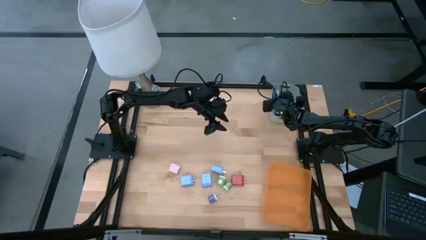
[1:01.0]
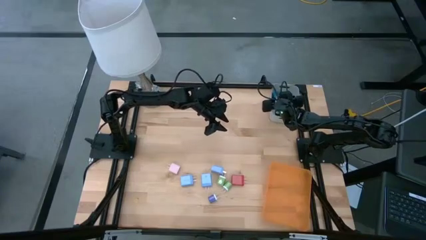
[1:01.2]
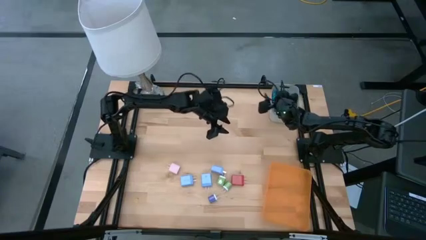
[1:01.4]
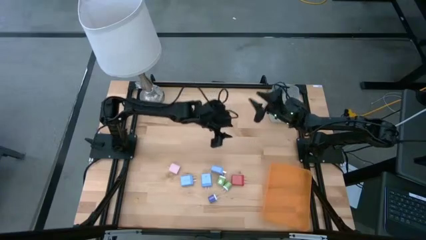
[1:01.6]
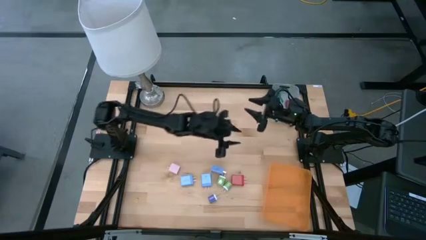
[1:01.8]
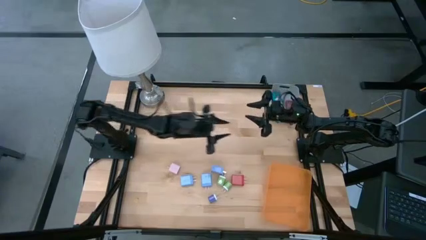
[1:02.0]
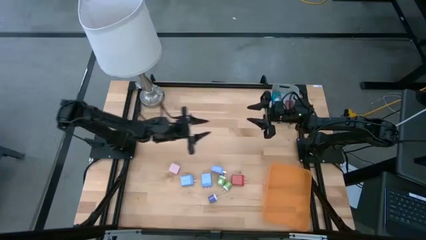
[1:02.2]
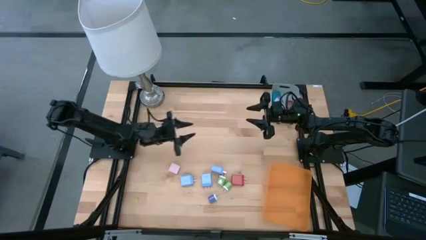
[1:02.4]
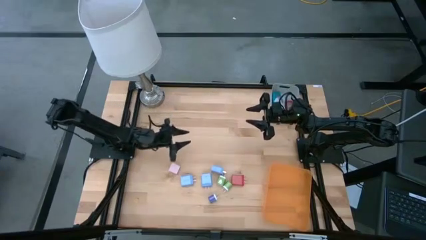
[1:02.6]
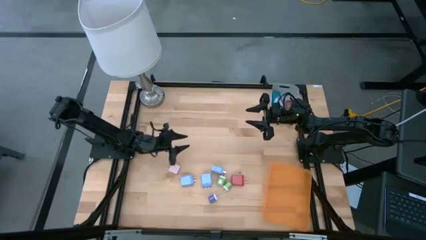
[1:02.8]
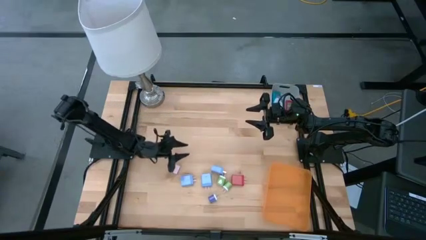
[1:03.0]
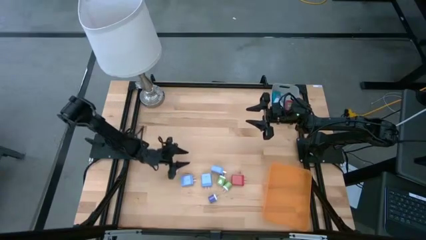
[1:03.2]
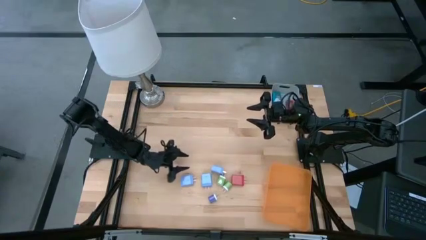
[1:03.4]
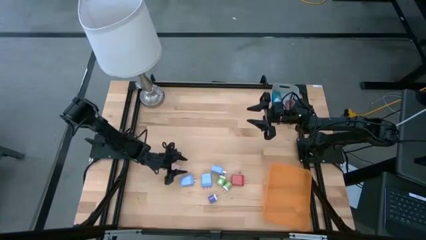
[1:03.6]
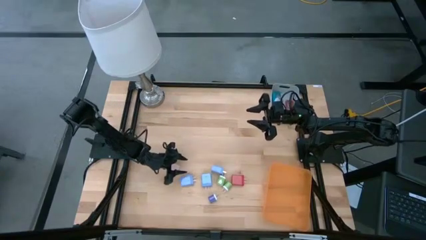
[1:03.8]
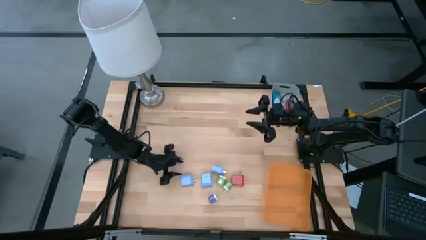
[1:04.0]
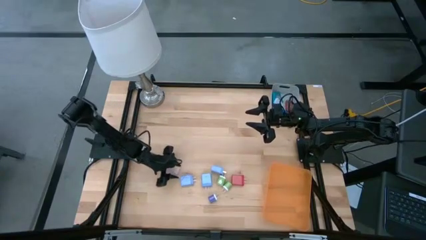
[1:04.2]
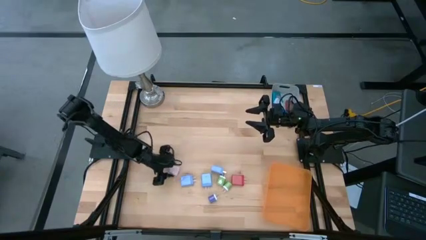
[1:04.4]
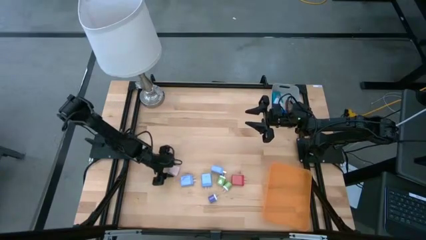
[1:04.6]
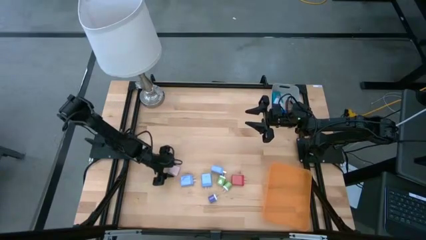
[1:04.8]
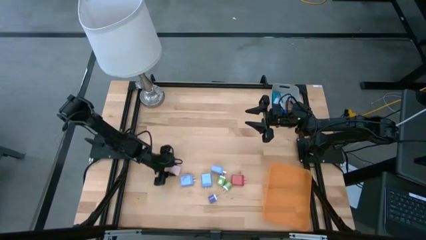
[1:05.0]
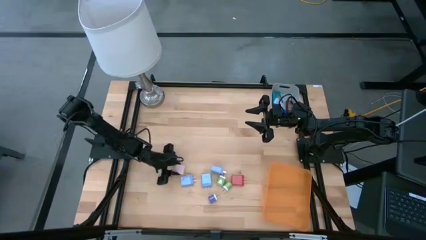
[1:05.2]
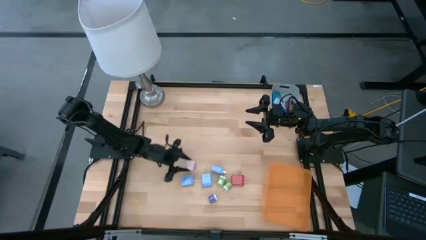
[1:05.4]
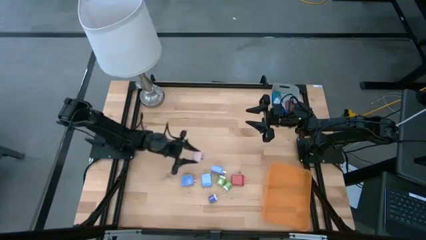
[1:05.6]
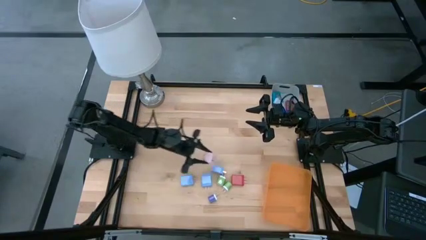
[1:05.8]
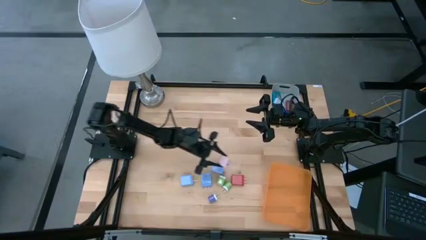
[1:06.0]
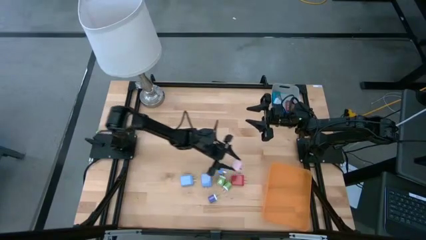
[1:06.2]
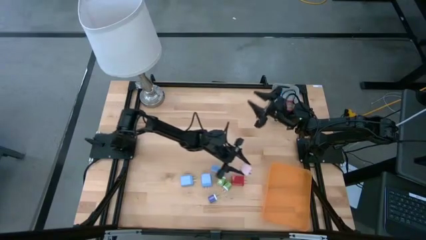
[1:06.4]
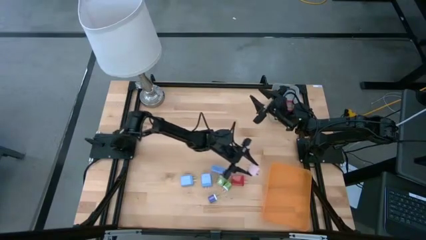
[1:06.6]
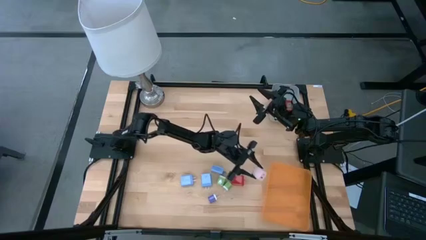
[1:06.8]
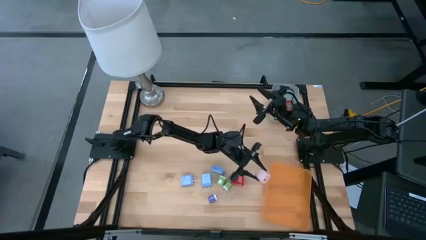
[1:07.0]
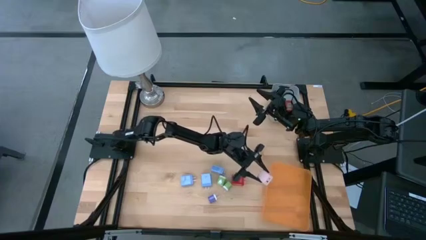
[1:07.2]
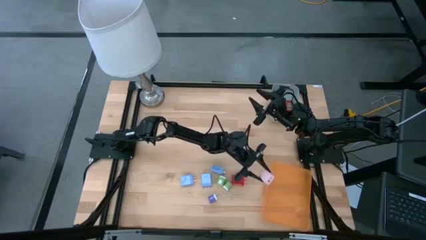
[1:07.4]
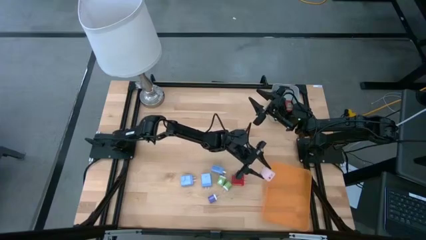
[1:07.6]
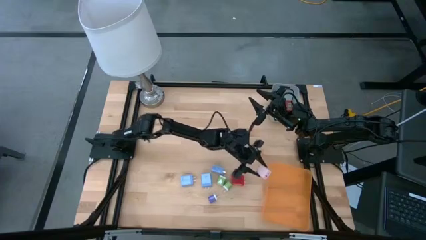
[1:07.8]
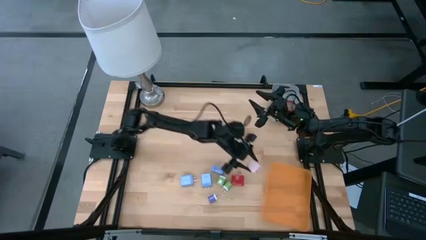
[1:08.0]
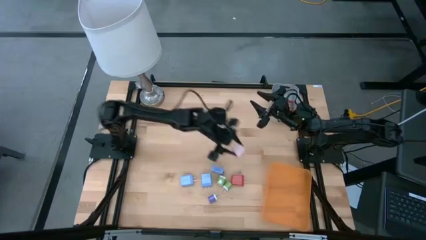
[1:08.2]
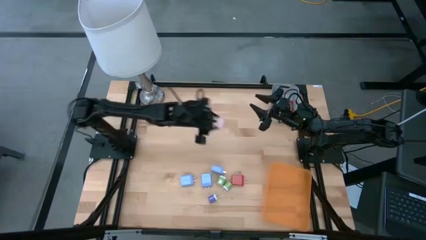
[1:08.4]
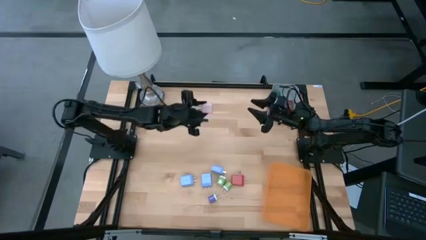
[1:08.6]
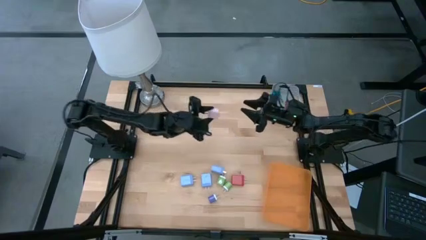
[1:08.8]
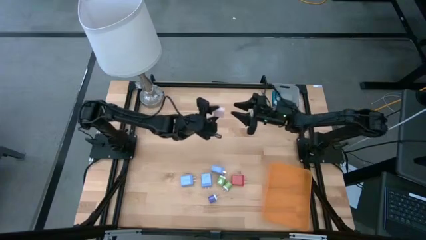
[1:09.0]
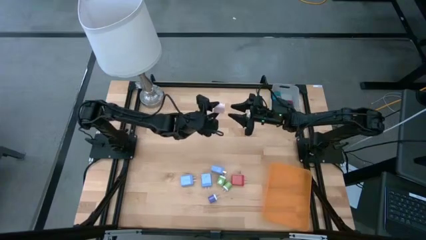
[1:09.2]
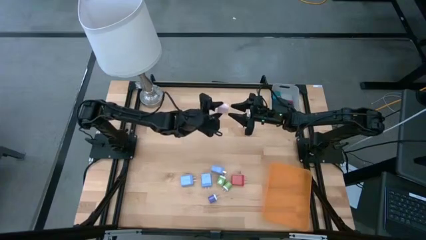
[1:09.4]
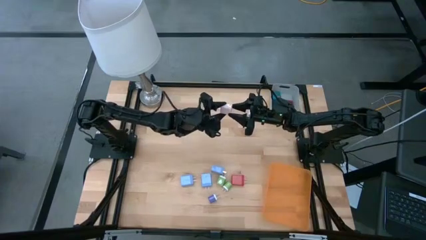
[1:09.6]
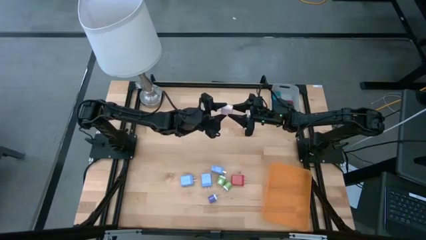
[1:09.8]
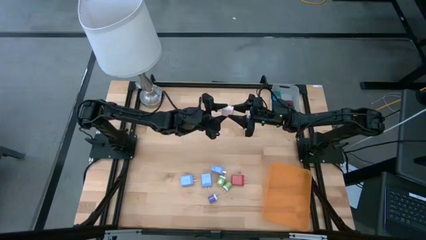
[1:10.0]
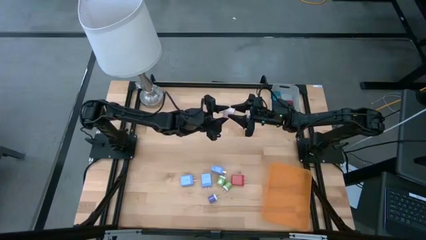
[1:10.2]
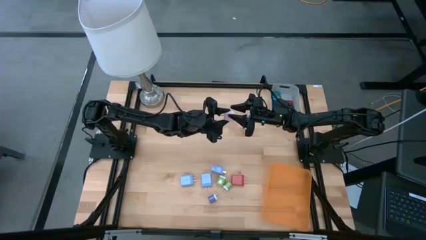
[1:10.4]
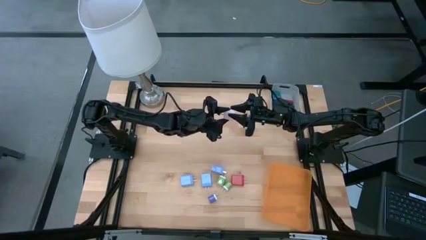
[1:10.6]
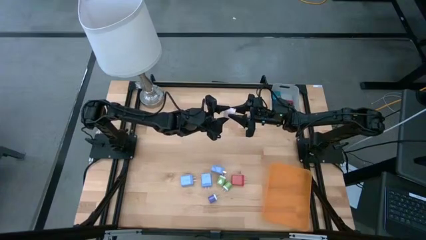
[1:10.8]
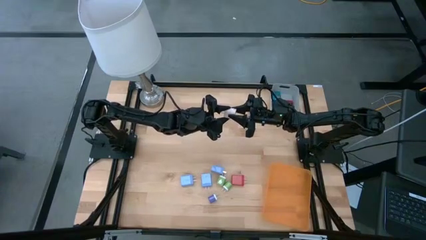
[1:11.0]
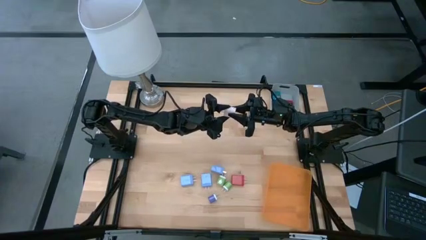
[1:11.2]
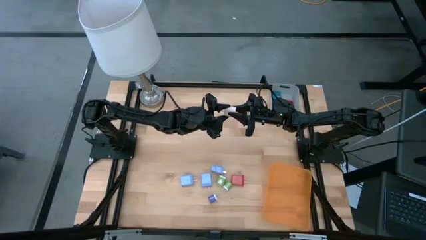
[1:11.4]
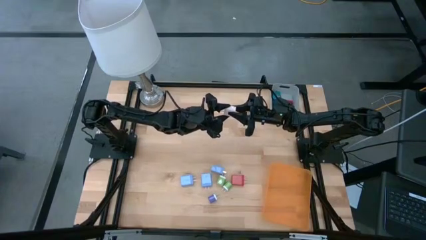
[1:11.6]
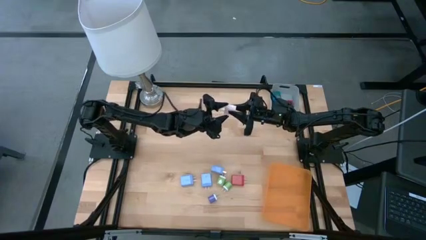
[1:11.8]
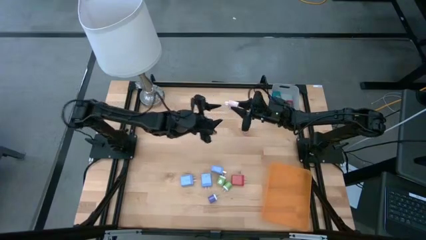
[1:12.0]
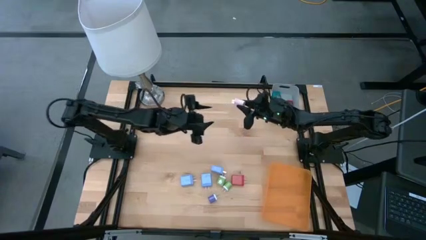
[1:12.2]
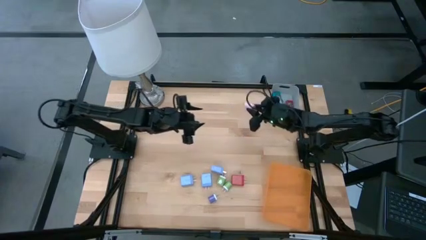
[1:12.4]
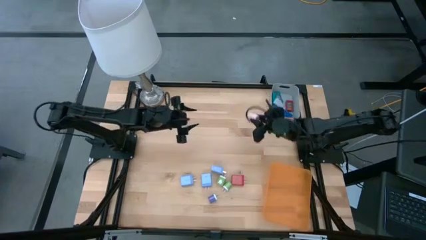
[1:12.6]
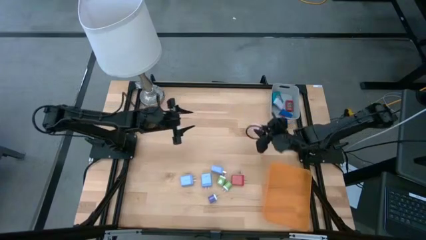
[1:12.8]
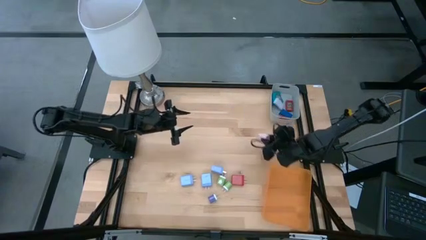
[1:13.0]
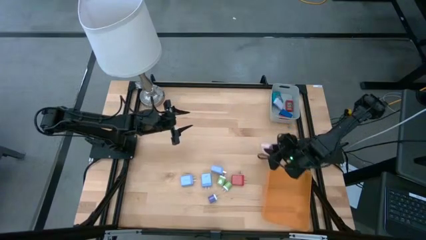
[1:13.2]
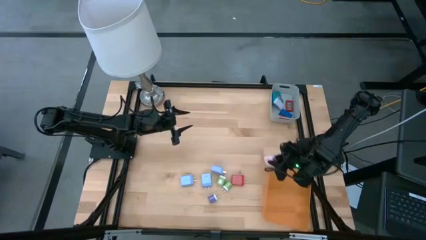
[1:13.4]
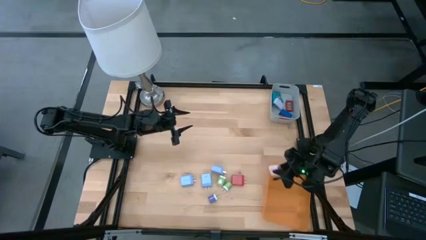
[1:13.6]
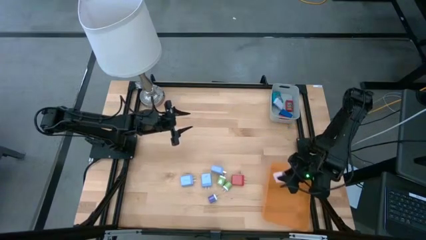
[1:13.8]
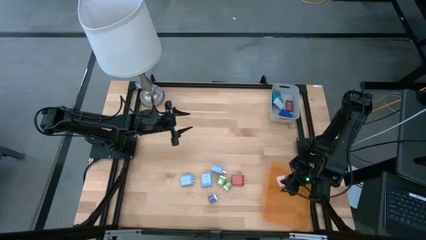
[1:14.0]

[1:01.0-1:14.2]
Task: Pick & Place Office items
Put the light pink charger adapter into the orange bin

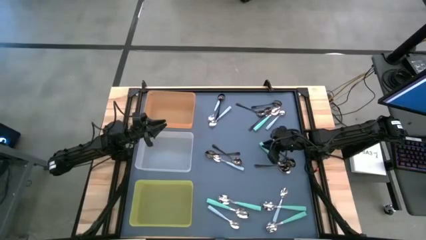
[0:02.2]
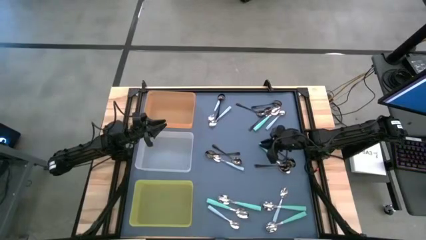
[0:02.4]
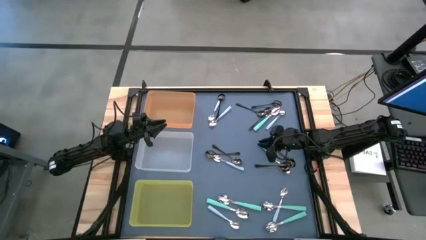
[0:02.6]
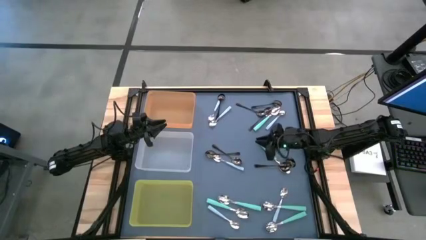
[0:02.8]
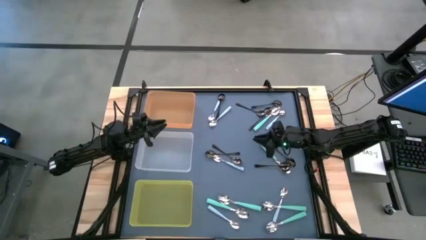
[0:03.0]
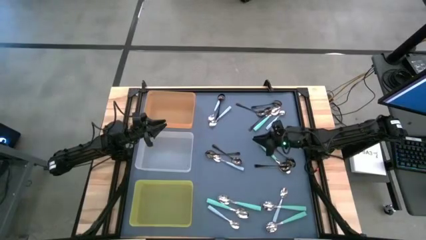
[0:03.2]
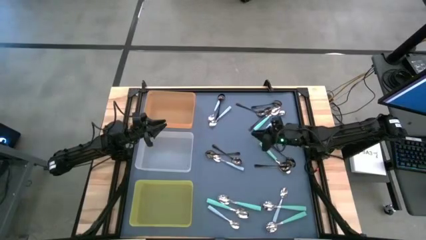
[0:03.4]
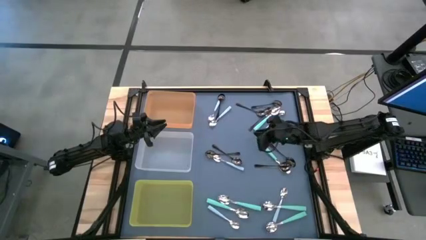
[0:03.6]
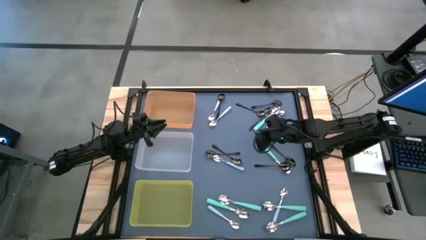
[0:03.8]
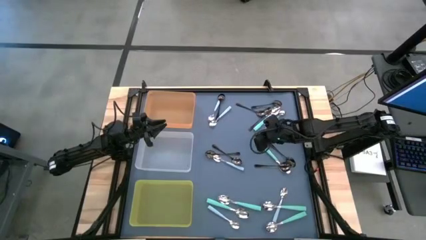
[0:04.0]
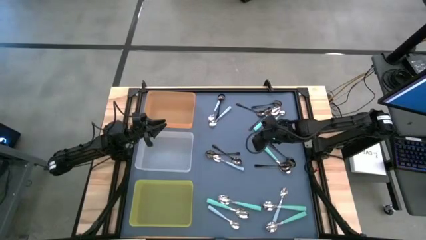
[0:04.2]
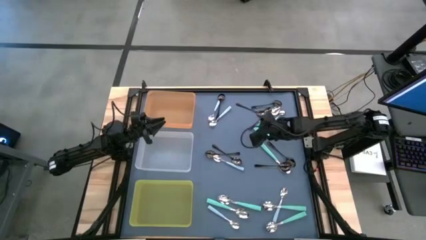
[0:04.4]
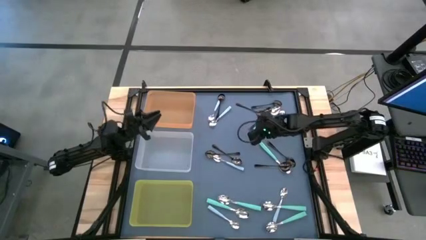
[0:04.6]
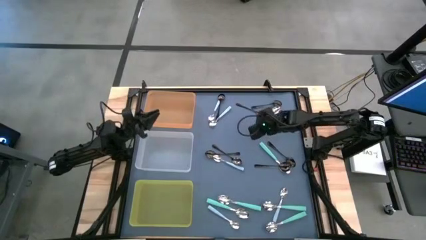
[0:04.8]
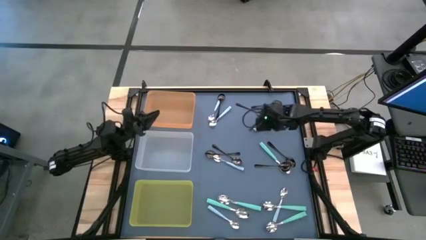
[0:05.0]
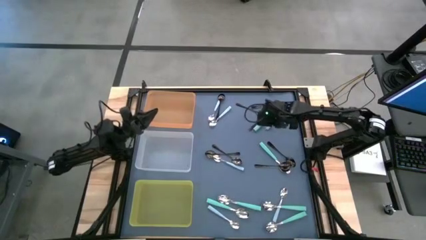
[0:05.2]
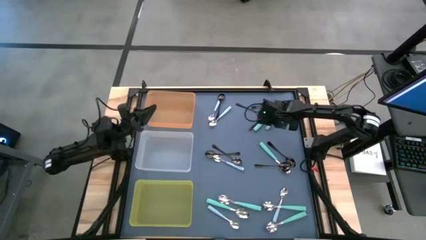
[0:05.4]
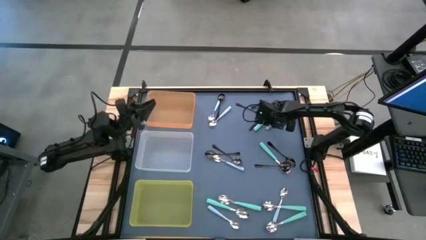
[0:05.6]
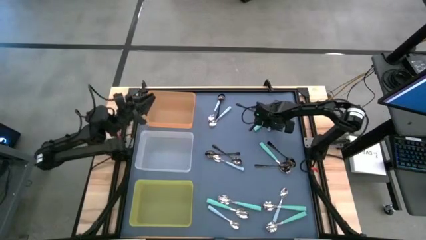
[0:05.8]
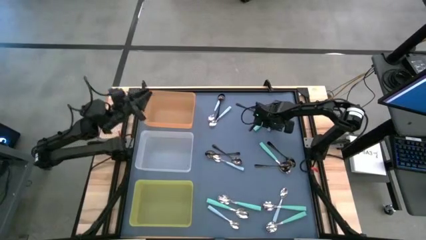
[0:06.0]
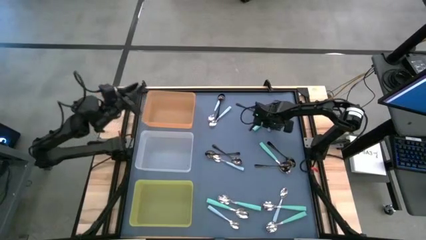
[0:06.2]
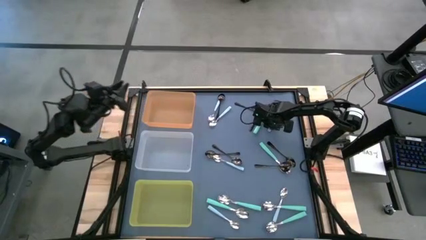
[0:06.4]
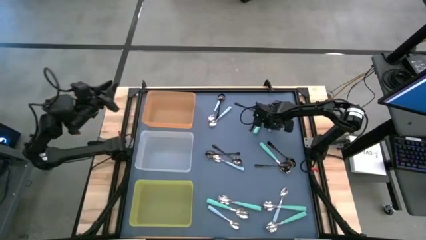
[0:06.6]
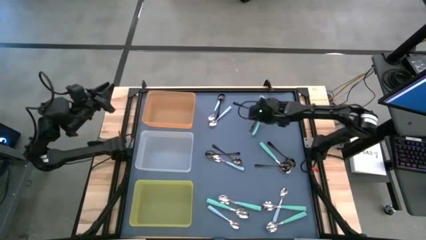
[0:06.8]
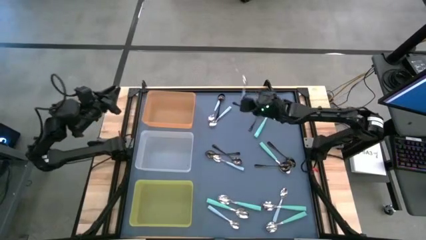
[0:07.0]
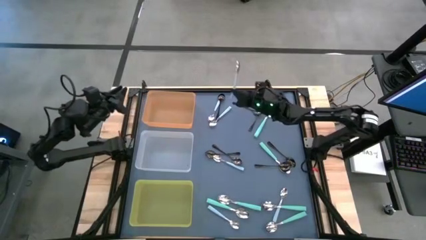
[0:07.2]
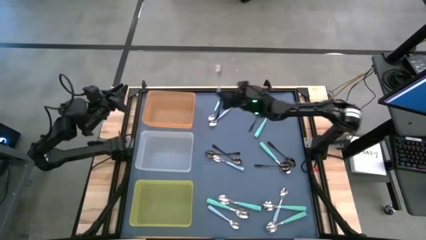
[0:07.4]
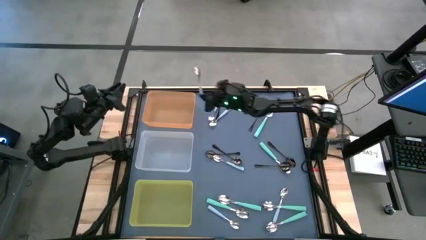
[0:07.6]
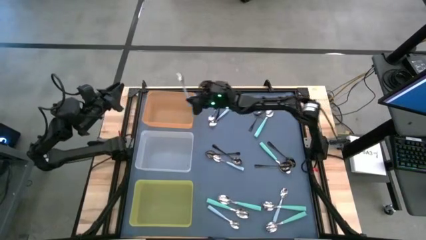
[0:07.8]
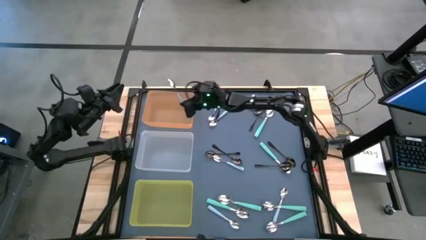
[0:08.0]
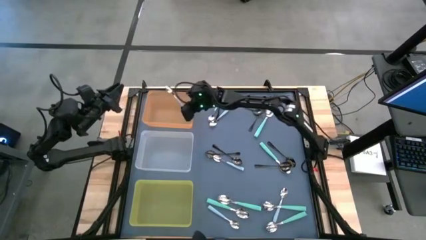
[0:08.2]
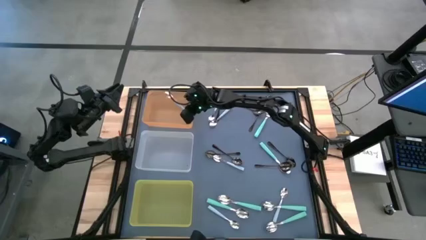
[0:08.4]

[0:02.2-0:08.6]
Task: Sort silverware by color (type)
Put the light blue spoon into the orange bin
